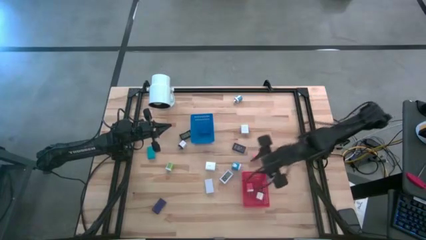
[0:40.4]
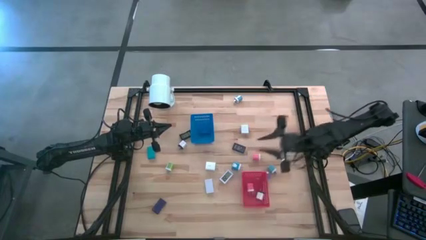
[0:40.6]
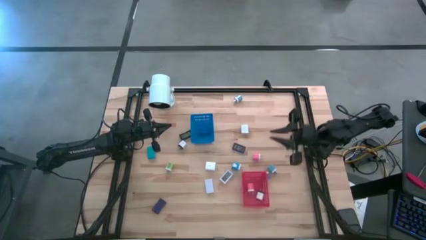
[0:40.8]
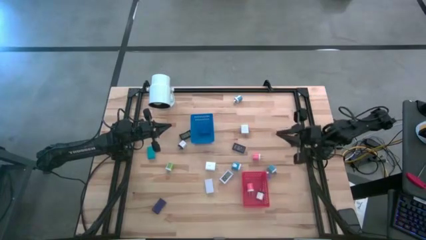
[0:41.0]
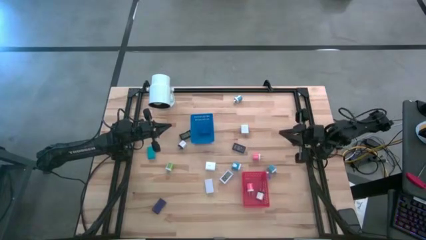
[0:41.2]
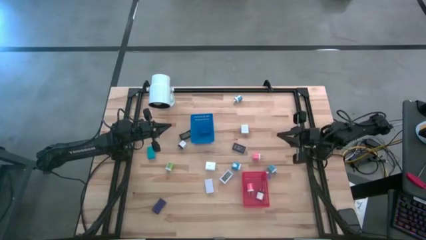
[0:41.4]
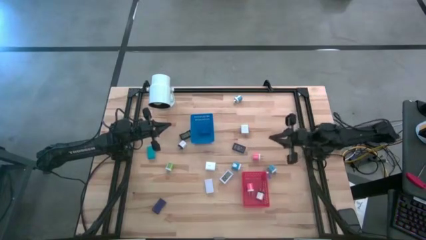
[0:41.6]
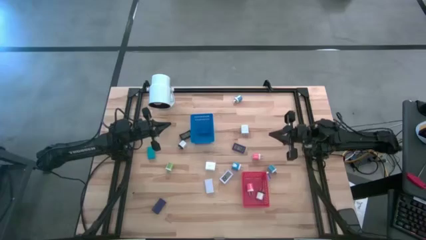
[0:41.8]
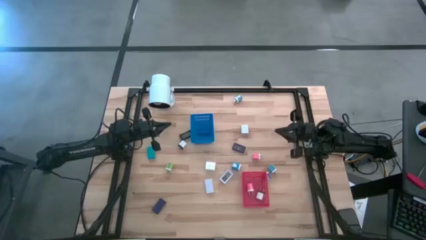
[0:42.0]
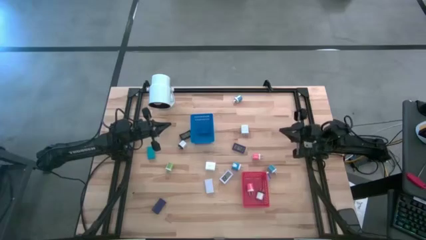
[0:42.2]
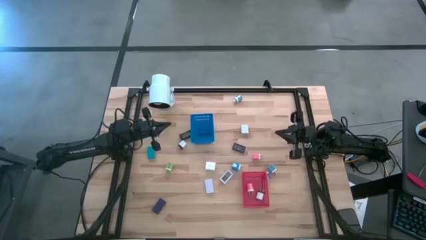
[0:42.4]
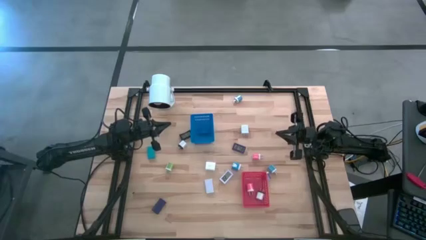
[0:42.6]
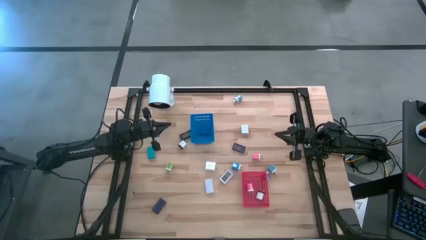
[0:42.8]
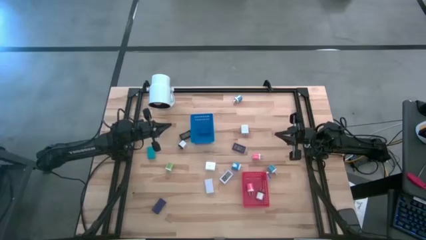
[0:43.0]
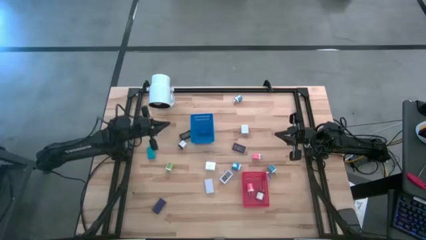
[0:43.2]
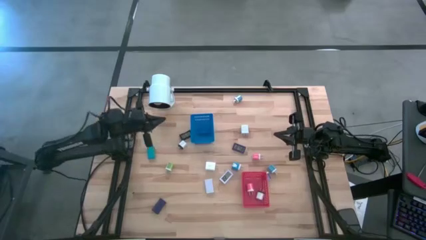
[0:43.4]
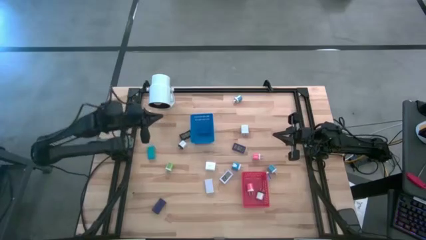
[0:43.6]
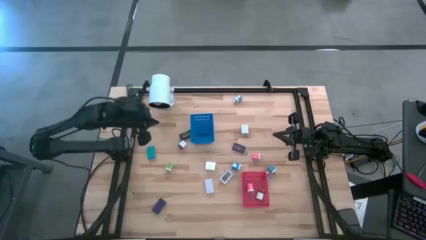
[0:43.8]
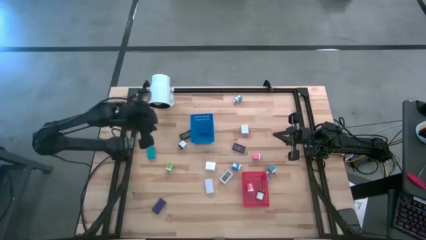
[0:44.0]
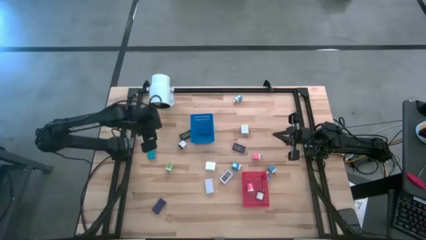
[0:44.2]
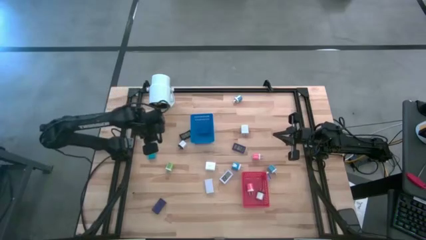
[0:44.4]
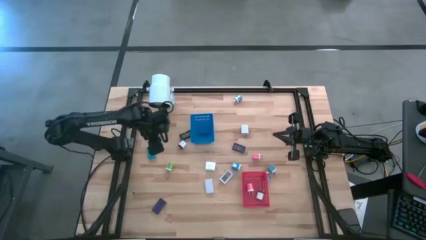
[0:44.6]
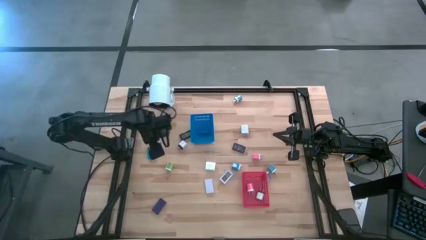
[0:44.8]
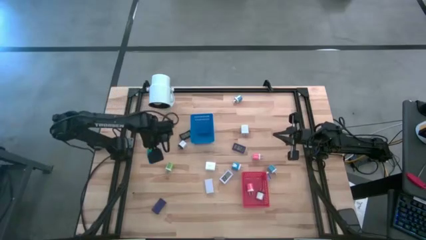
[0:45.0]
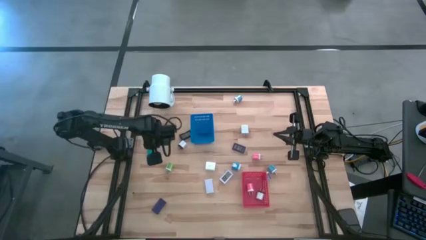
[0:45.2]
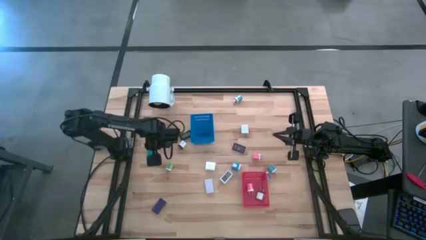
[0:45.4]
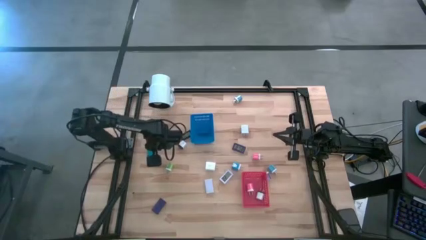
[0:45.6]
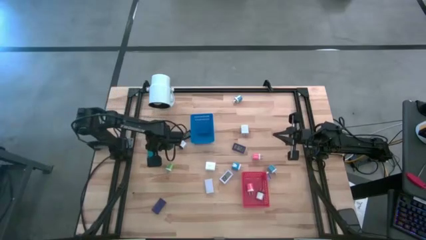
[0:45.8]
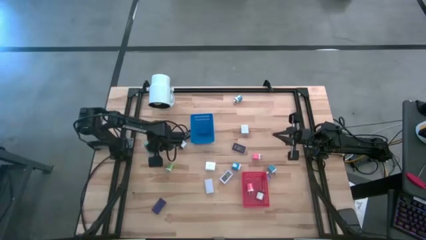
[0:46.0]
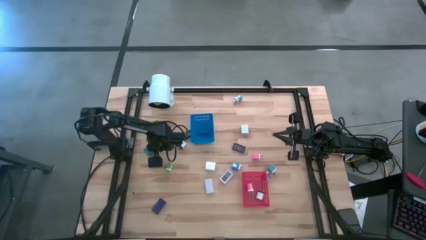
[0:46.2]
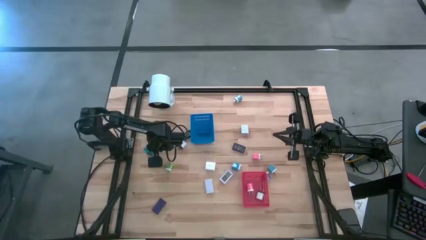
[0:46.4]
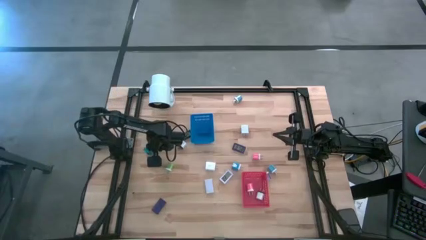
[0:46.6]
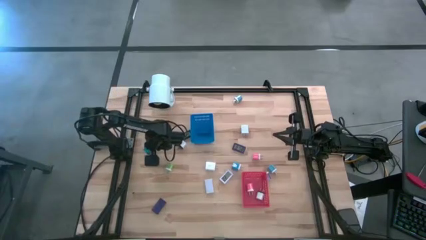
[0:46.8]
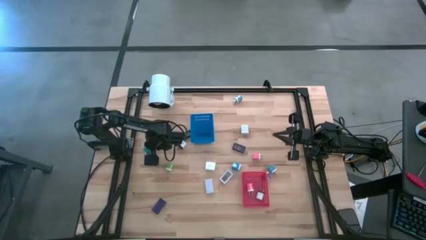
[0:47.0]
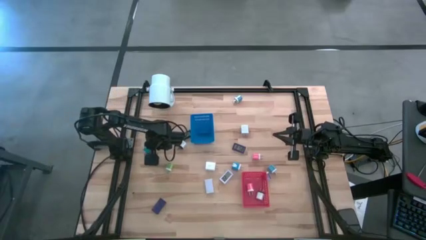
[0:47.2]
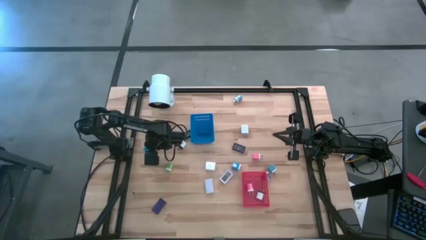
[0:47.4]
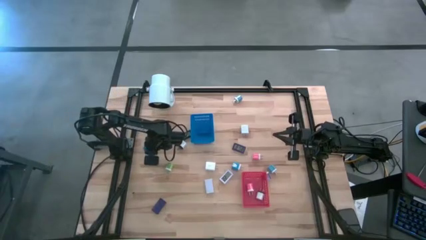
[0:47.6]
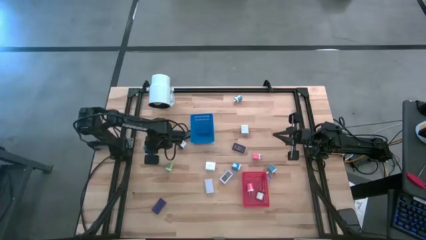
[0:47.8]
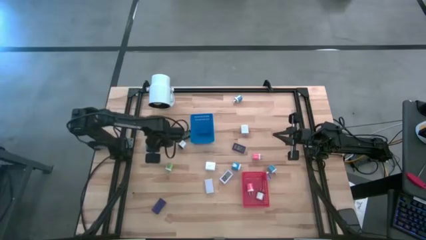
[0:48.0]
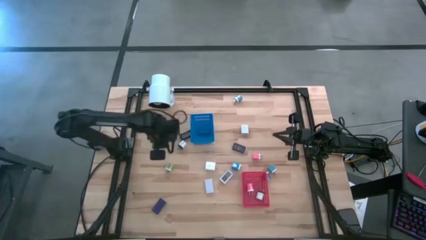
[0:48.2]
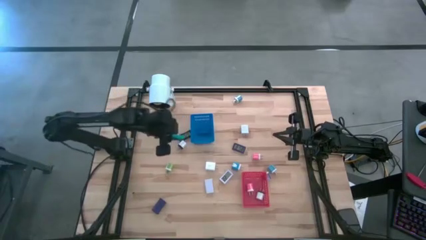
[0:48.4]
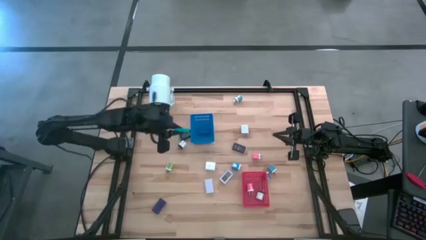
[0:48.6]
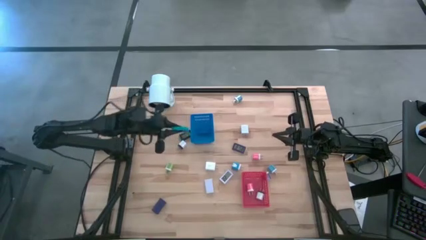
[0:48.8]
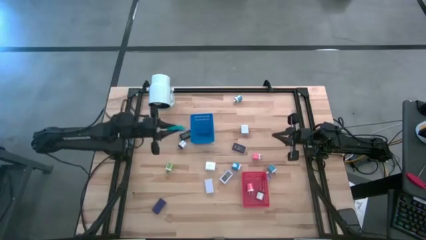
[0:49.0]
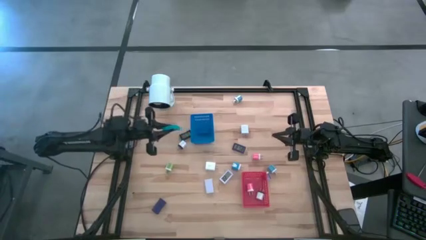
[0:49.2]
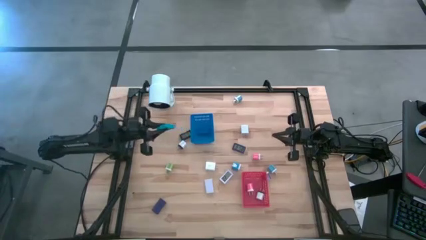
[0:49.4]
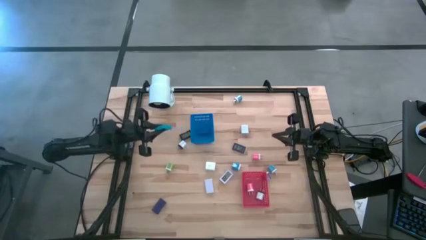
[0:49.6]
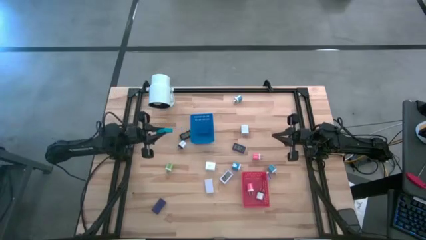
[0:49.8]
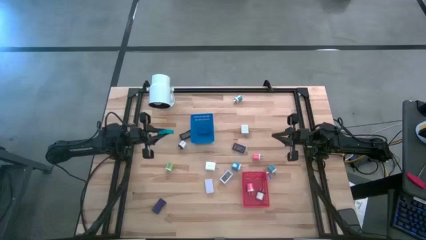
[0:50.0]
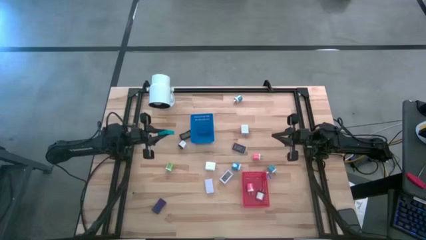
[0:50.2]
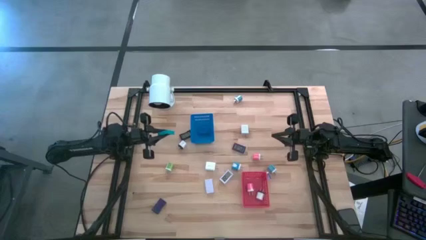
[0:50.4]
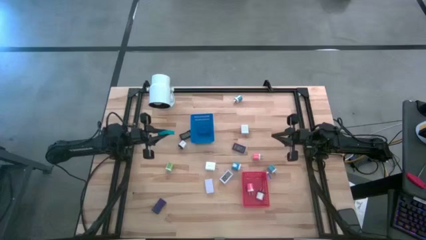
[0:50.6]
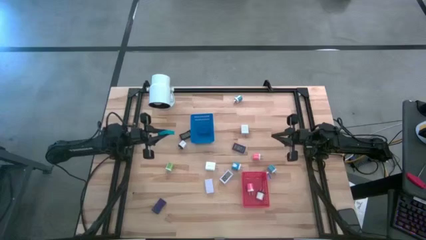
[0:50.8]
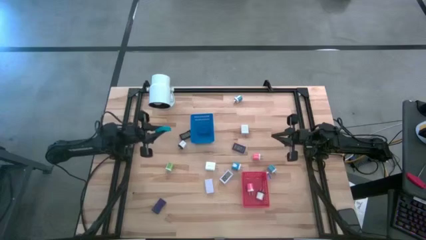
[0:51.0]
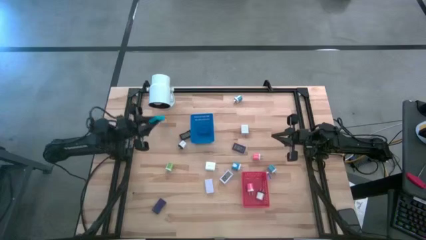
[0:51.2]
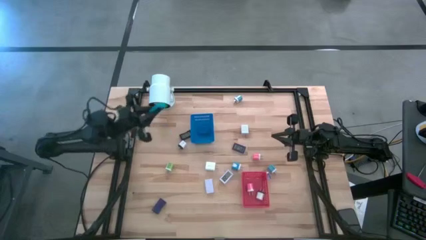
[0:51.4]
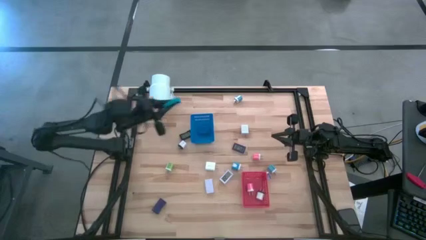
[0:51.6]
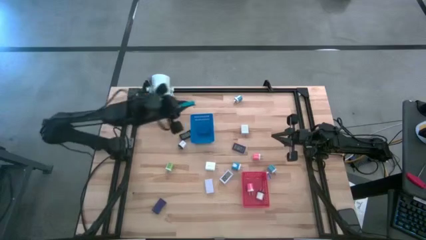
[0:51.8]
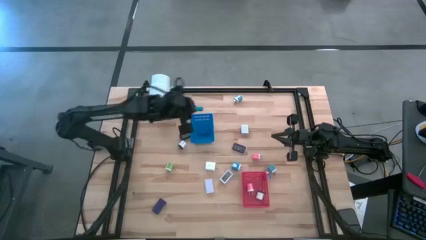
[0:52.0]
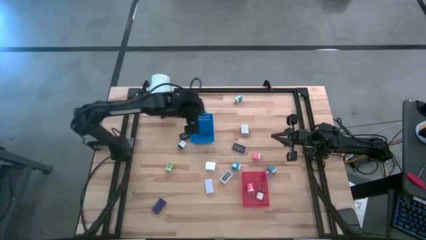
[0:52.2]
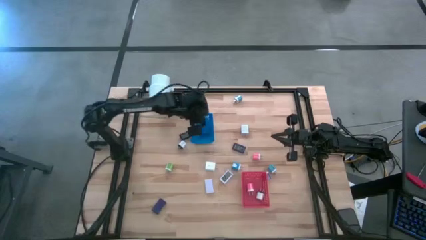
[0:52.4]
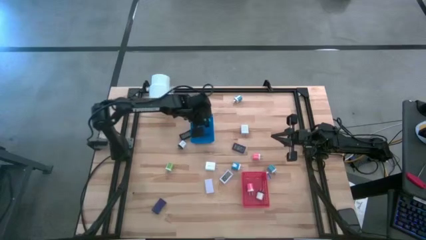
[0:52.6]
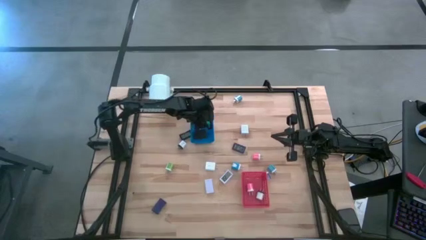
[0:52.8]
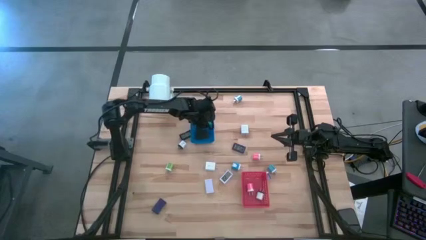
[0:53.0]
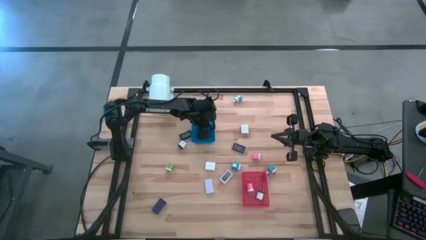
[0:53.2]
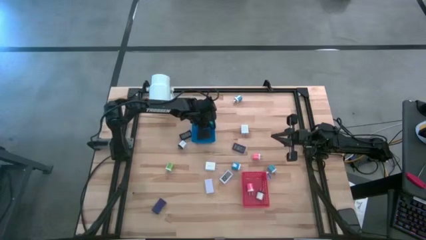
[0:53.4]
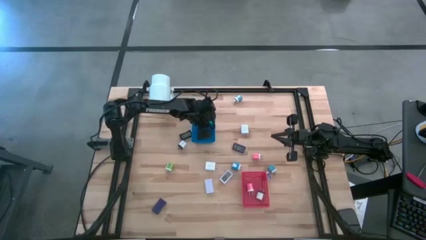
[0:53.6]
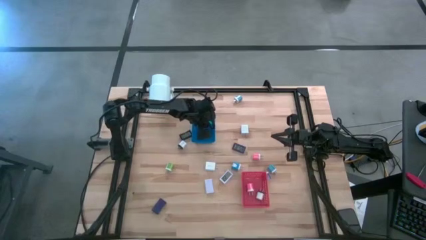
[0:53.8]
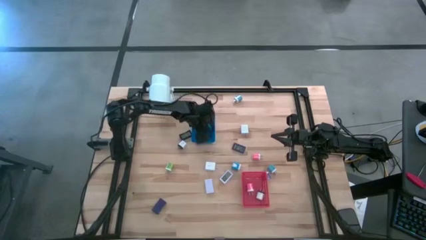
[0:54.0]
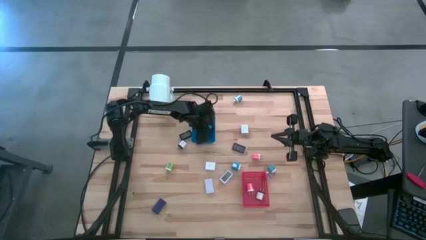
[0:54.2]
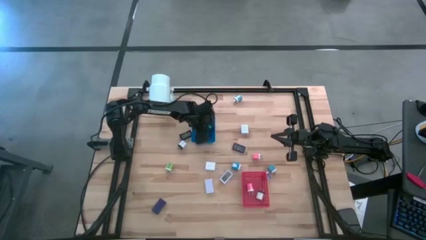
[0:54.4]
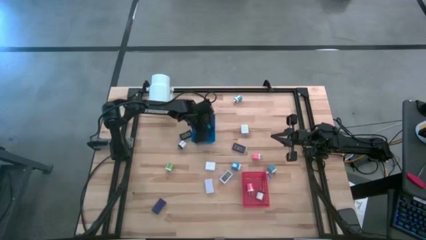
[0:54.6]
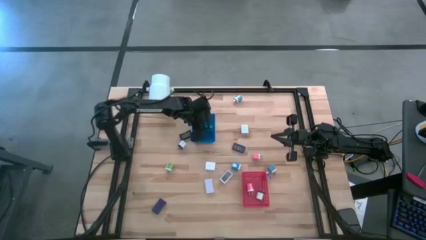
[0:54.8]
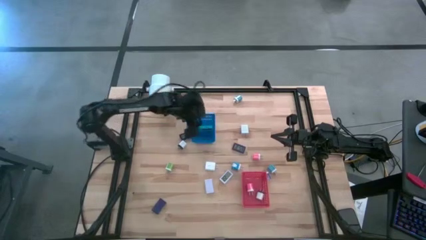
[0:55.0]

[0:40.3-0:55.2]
Task: Pick & Place Office items
Put the light blue clock into the blue bin
